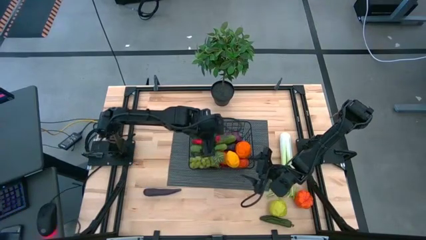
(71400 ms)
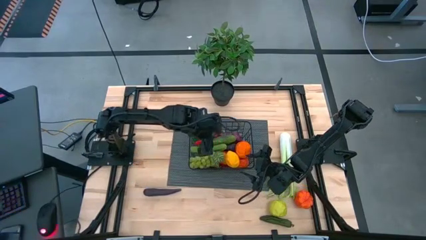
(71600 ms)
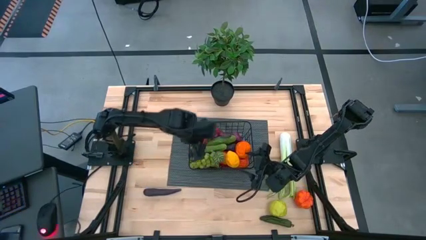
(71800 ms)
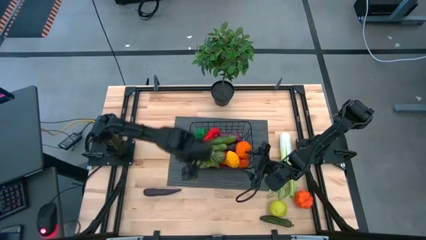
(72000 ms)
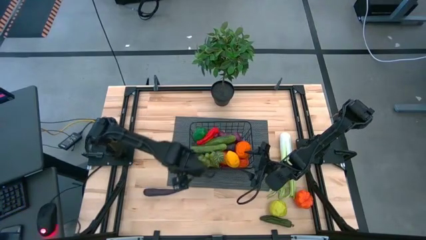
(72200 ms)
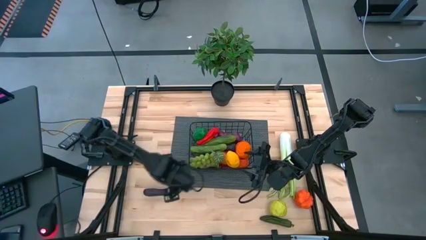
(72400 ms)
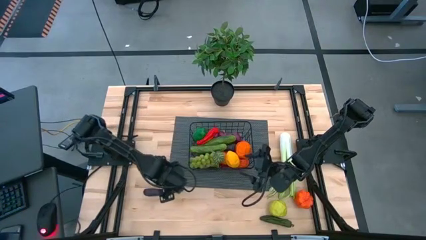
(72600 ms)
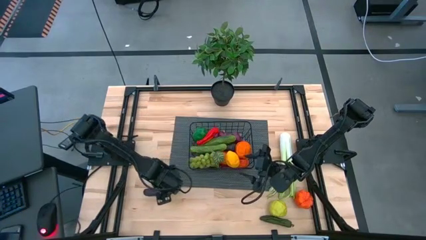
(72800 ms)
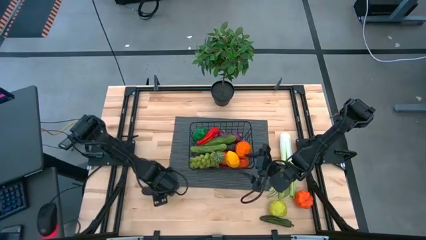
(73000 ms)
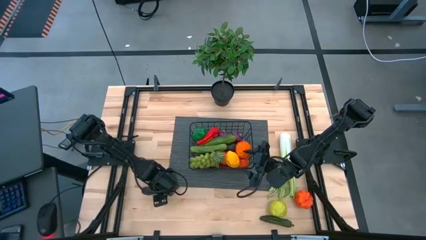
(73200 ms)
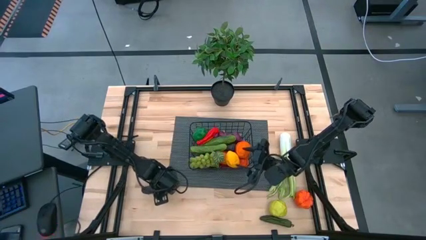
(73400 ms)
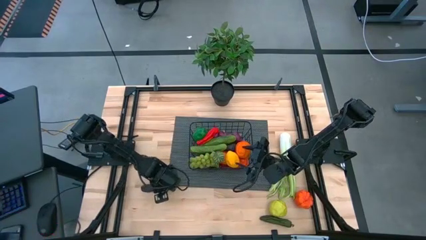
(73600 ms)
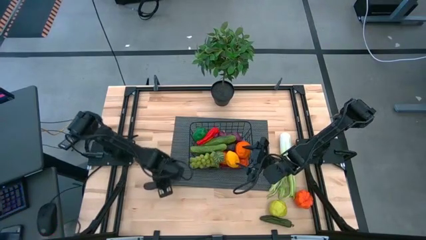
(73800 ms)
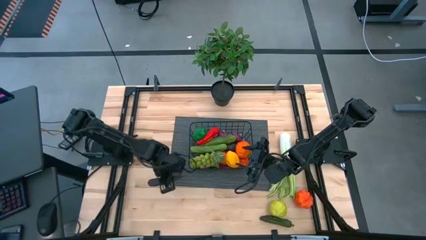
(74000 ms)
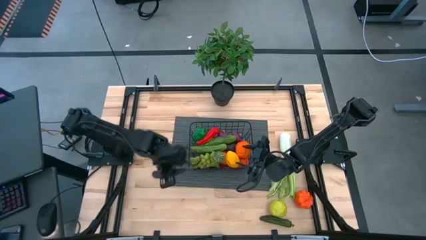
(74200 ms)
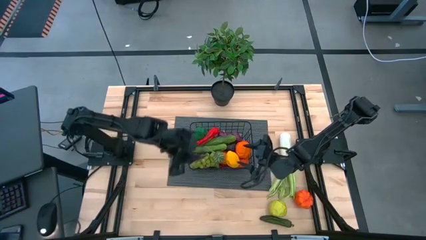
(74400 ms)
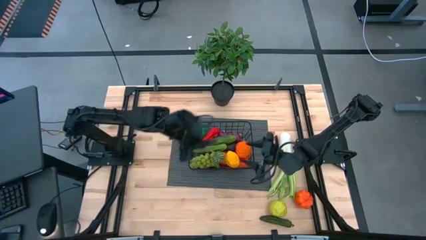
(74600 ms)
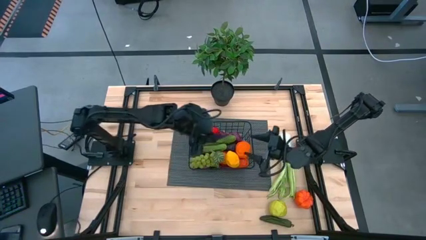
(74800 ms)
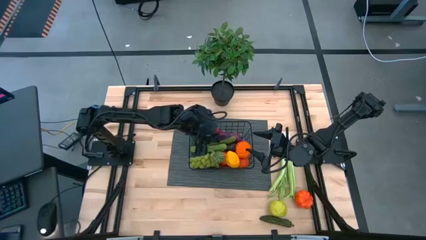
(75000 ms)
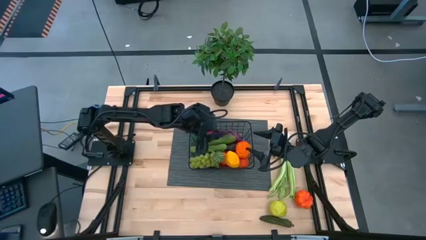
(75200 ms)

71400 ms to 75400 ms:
Task: Build produce basket
Put the eggplant into the wire basket

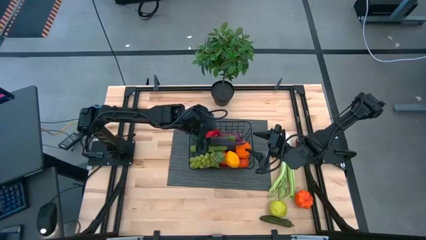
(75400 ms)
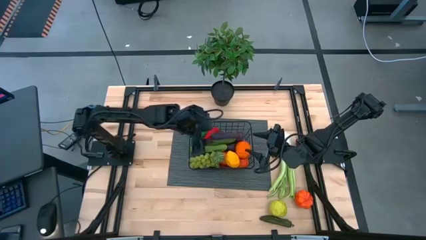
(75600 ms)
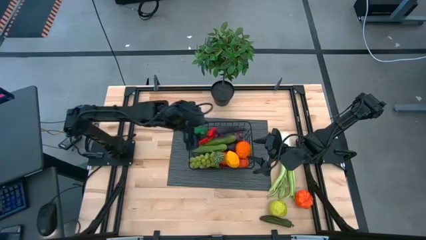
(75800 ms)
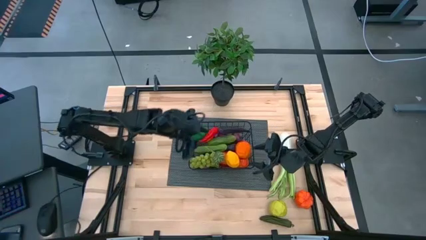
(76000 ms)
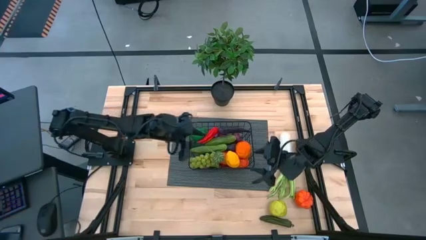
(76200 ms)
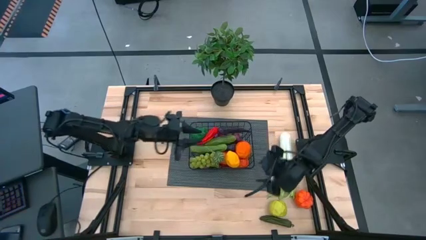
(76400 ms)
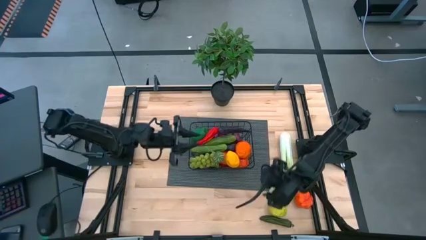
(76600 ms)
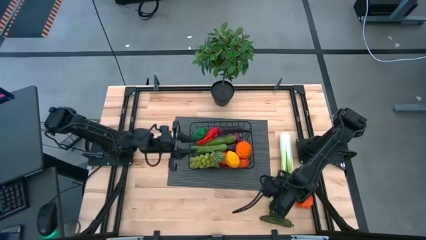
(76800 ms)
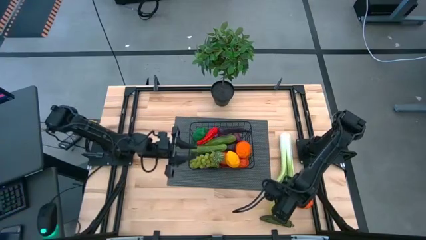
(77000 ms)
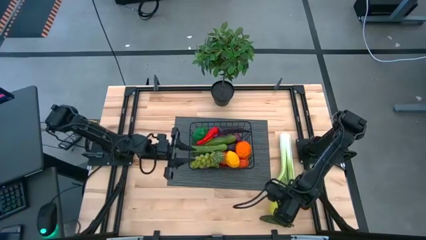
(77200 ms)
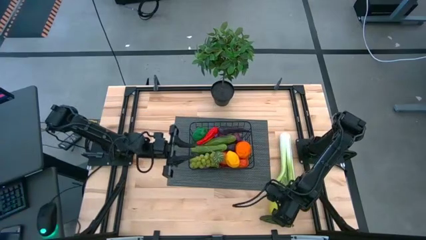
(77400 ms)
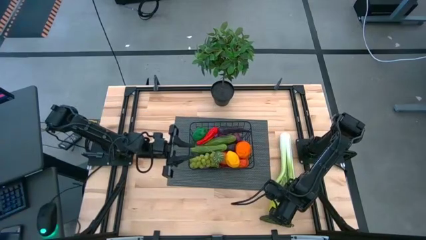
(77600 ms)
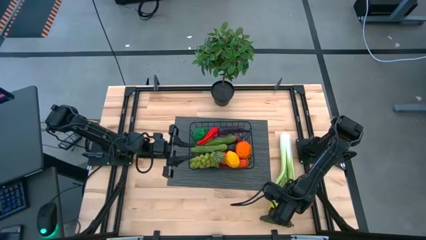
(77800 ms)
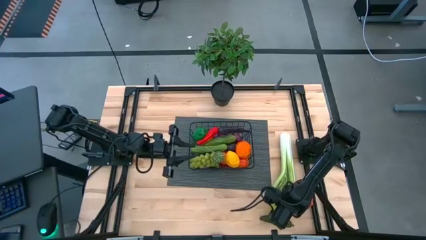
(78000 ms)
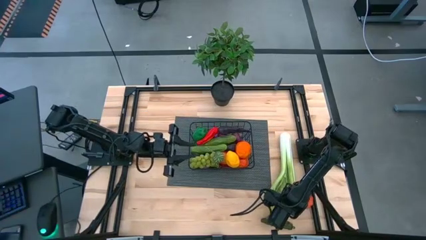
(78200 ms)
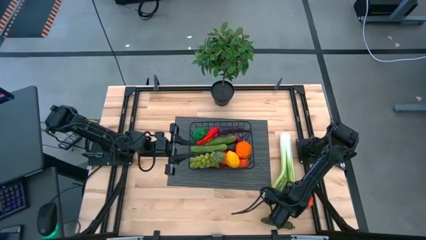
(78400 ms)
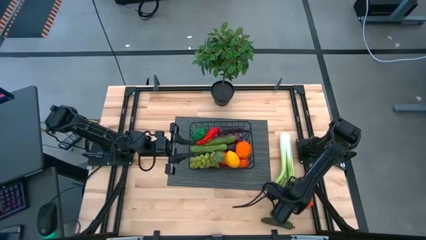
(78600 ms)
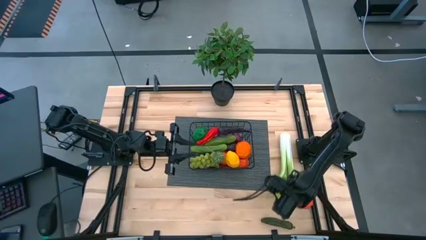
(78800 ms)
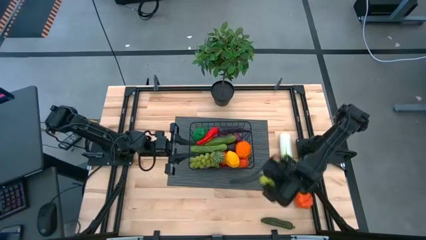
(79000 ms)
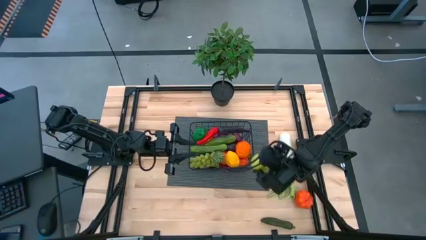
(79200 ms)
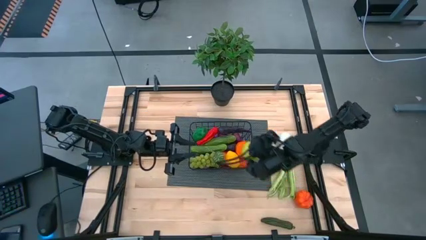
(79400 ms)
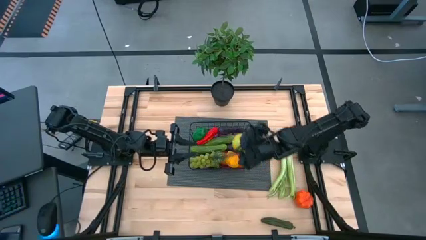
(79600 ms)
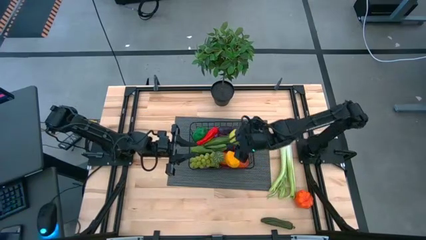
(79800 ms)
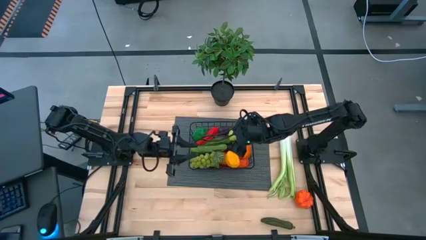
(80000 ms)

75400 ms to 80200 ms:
Put the apple into the wire basket

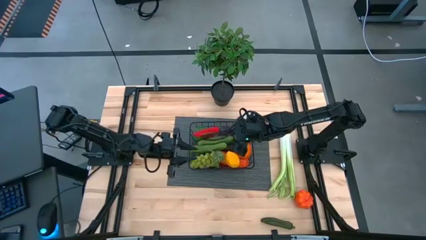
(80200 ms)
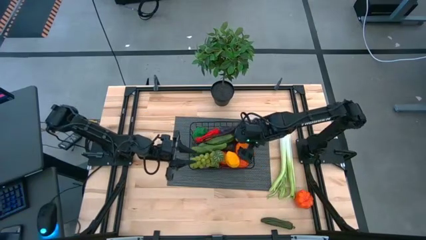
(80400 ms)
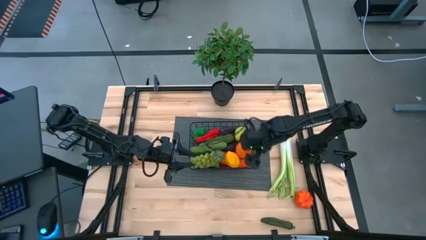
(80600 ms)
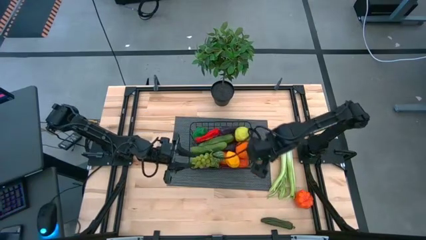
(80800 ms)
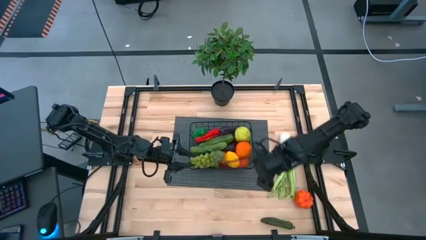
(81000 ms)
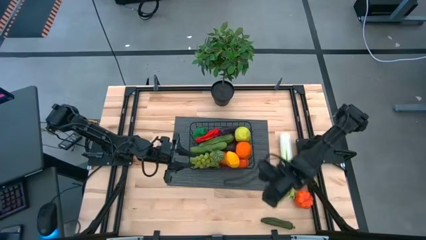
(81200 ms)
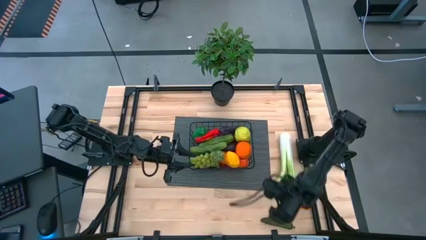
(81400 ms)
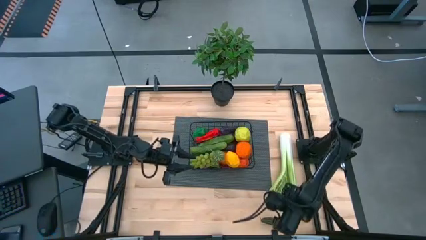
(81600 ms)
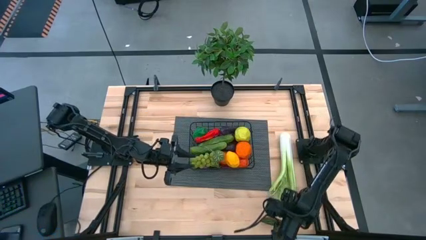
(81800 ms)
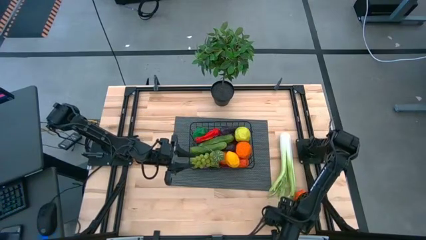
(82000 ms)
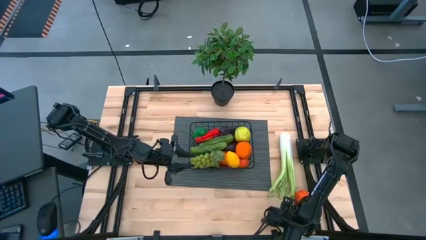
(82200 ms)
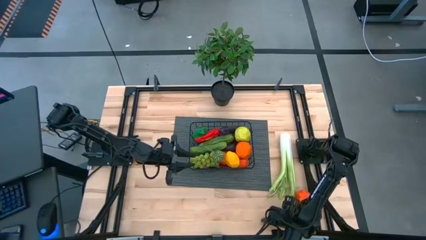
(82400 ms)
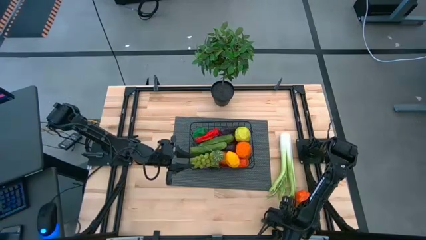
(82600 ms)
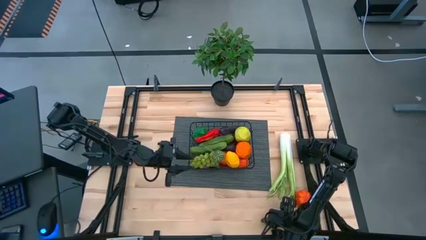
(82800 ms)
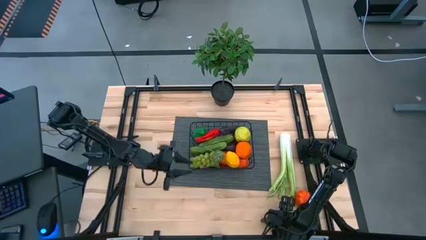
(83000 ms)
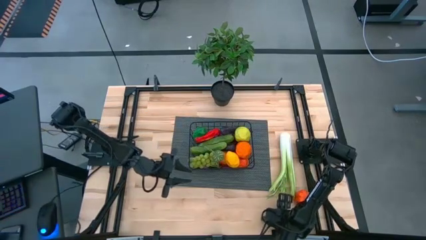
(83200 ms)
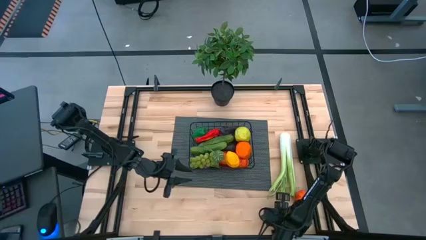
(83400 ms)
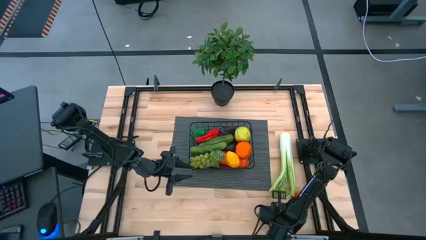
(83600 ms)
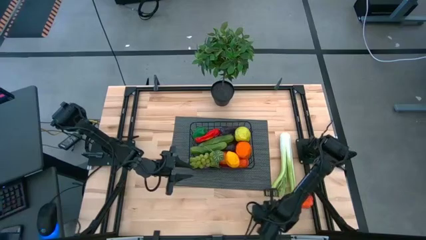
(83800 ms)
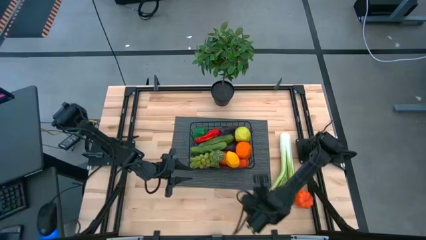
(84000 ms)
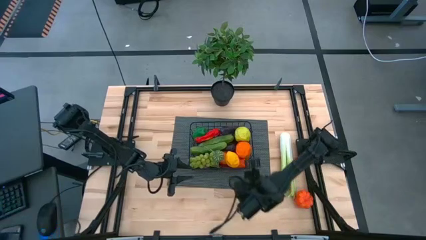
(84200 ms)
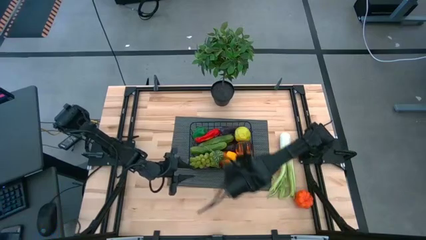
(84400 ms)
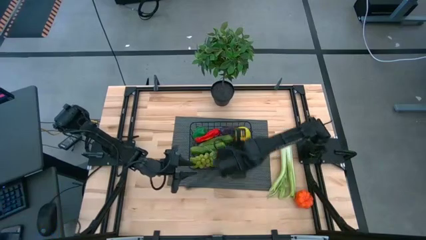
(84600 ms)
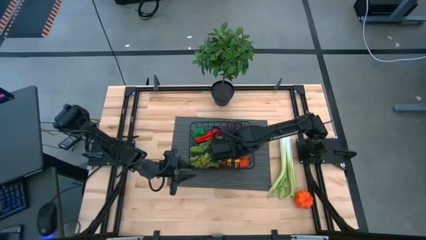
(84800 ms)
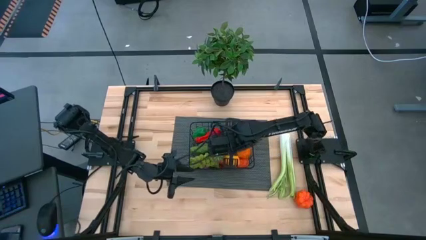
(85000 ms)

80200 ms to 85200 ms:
Put the green chili pepper into the wire basket

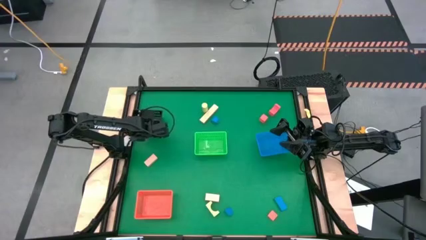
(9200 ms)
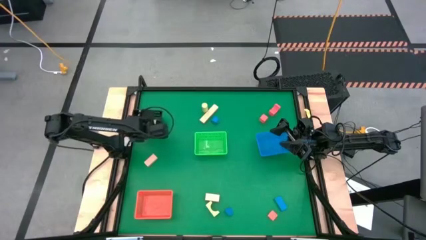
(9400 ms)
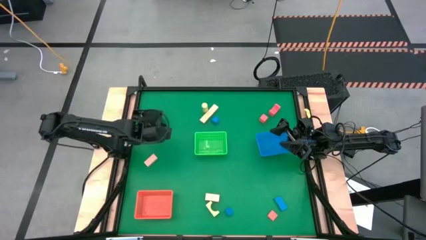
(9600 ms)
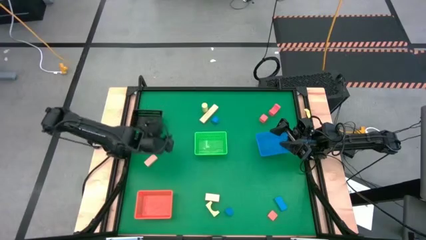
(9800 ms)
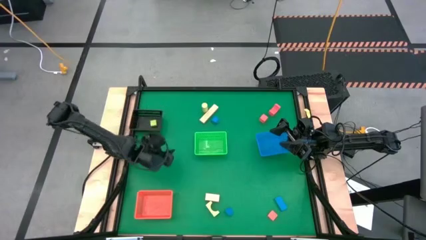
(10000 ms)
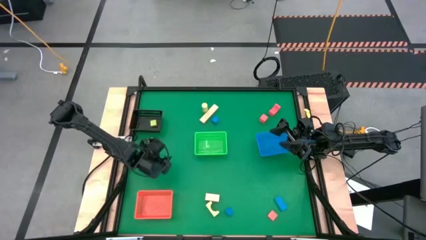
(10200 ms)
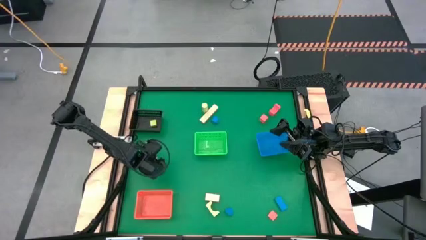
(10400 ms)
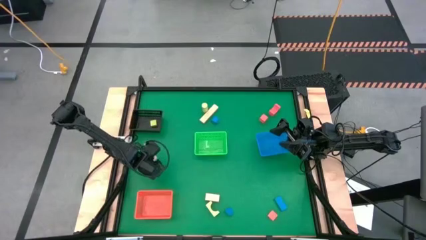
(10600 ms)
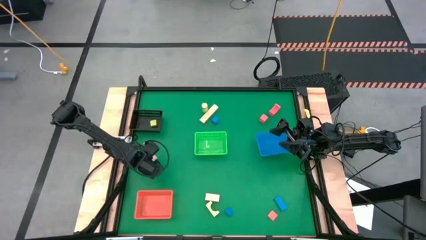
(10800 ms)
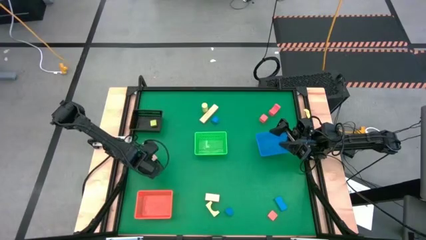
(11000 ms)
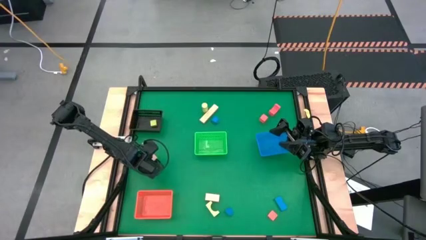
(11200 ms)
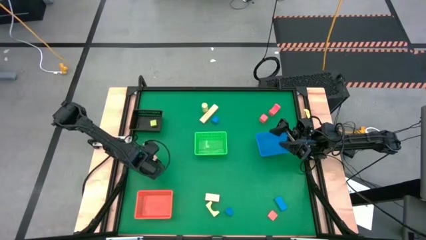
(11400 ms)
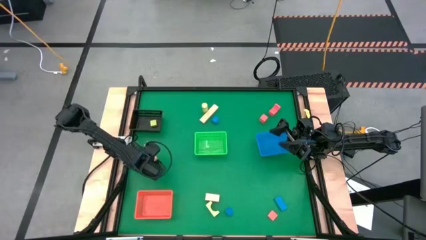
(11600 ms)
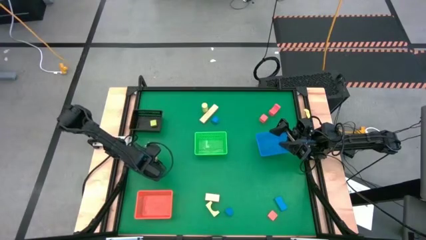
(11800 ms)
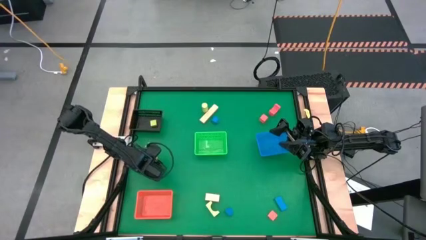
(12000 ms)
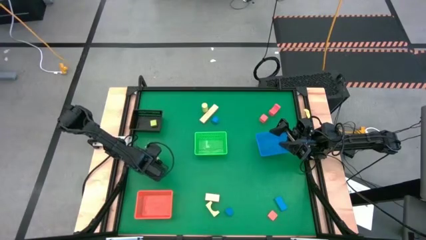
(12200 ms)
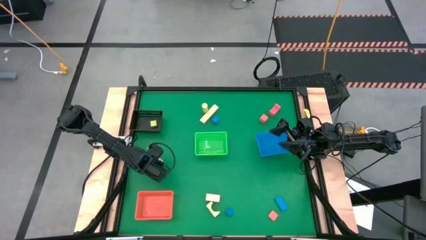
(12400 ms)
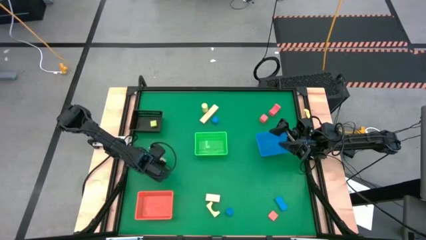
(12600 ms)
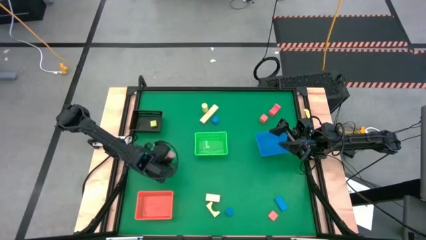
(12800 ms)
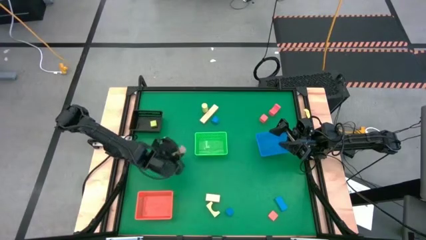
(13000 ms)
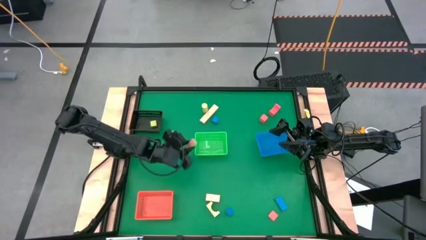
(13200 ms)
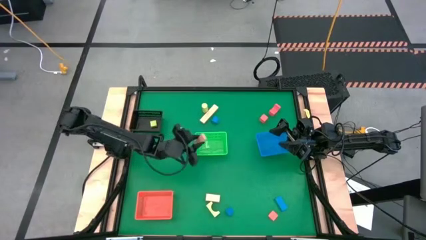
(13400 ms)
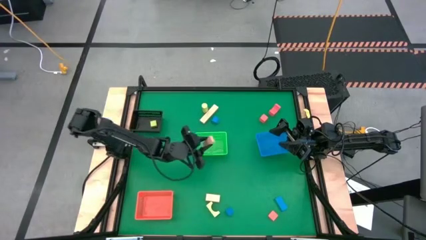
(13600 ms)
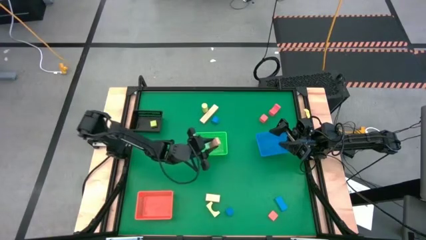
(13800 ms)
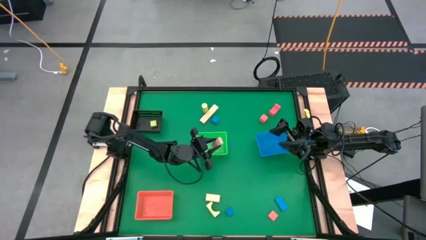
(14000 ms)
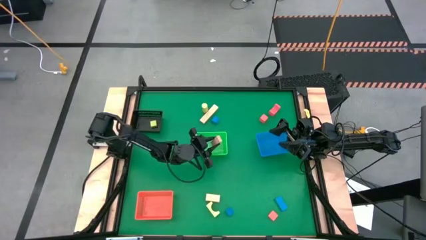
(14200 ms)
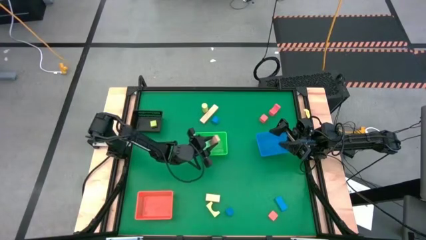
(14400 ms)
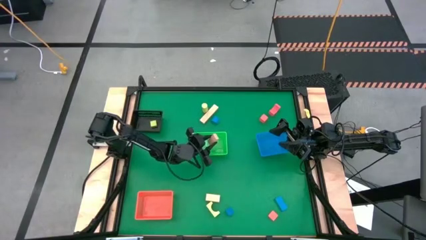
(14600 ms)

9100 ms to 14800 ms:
Task: Sort & place blocks by color
Put the middle light brown block into the green bin
